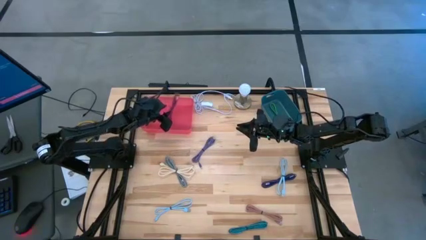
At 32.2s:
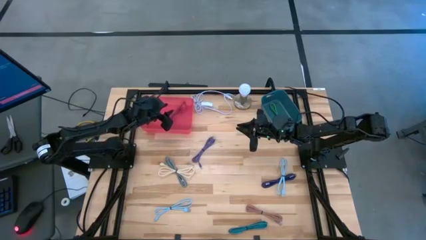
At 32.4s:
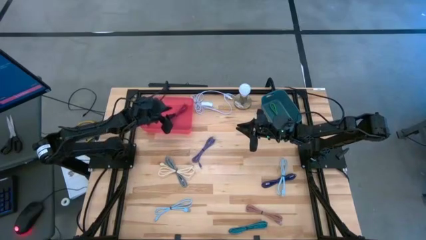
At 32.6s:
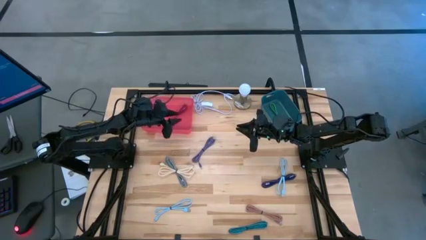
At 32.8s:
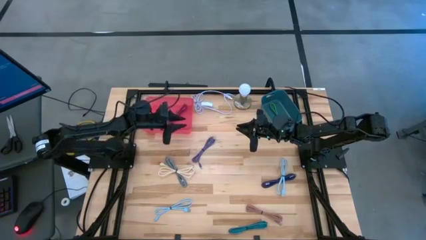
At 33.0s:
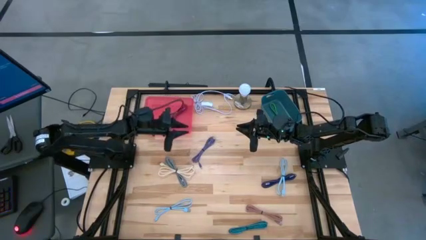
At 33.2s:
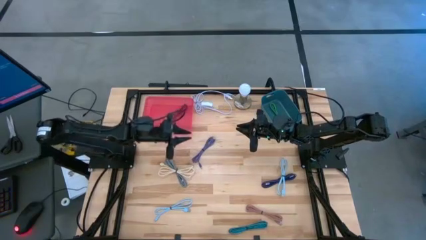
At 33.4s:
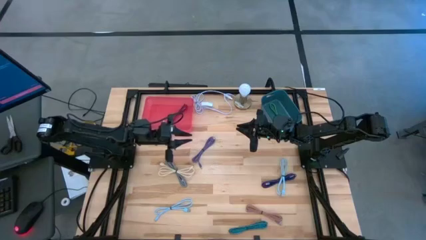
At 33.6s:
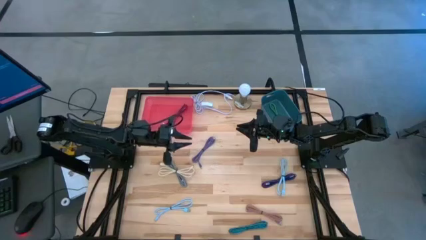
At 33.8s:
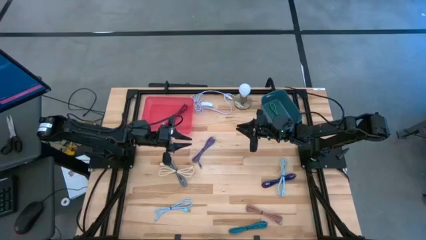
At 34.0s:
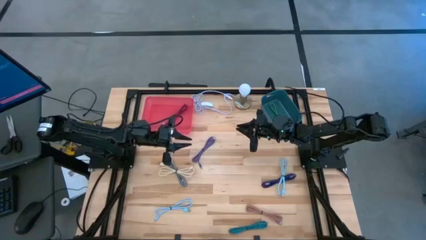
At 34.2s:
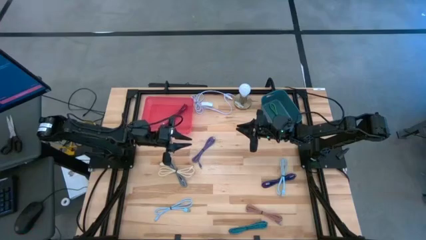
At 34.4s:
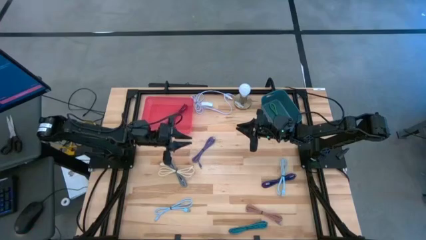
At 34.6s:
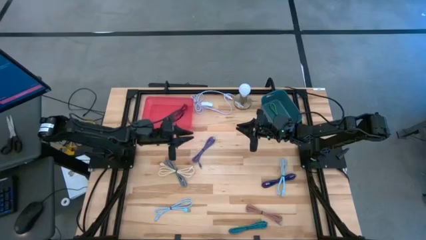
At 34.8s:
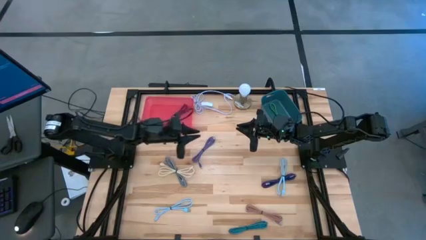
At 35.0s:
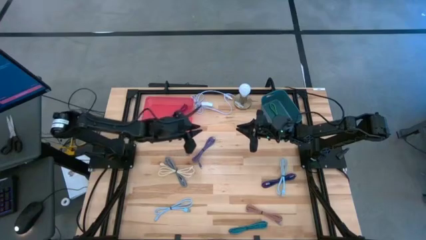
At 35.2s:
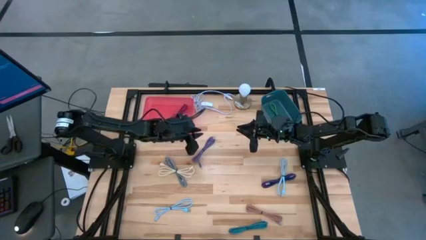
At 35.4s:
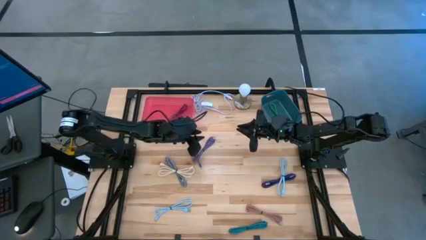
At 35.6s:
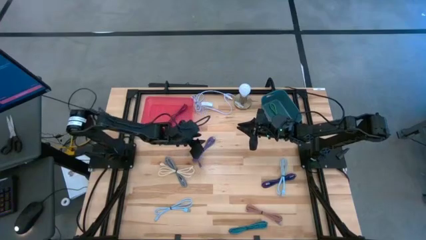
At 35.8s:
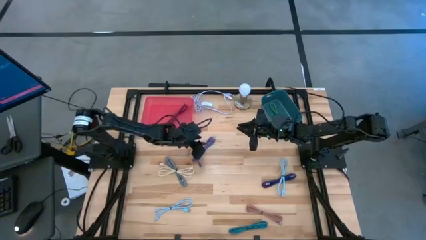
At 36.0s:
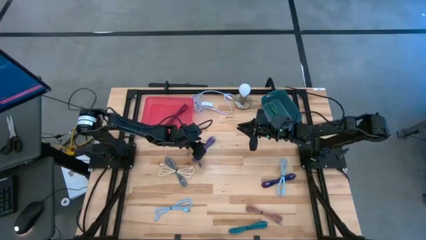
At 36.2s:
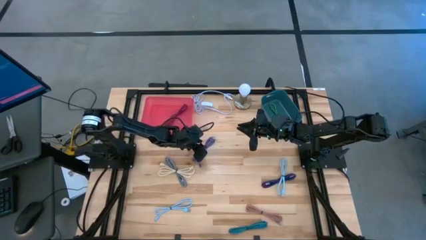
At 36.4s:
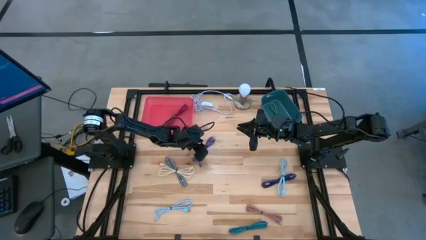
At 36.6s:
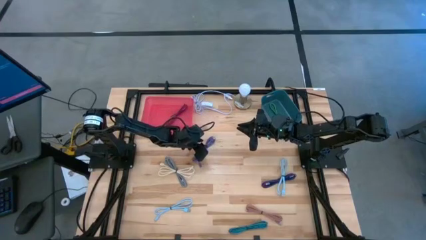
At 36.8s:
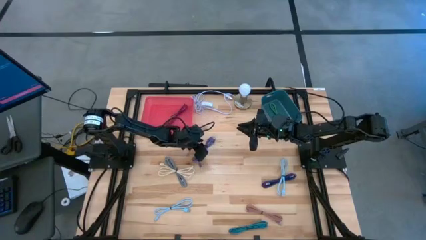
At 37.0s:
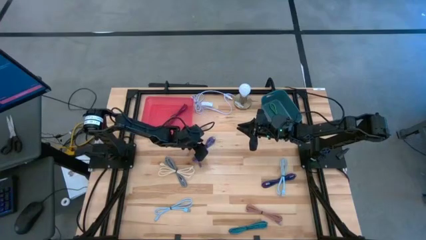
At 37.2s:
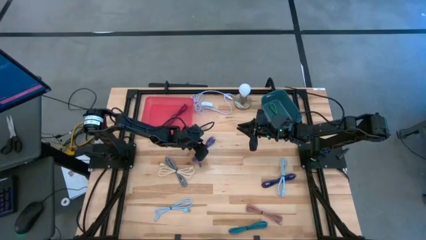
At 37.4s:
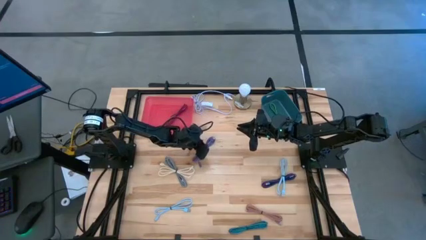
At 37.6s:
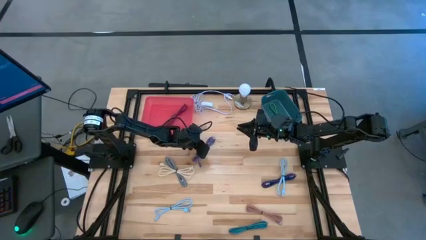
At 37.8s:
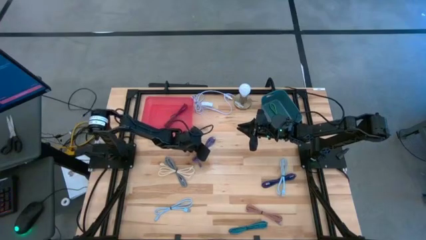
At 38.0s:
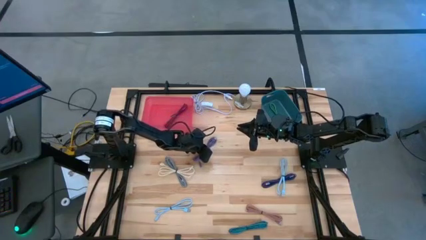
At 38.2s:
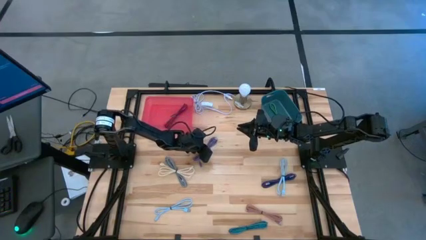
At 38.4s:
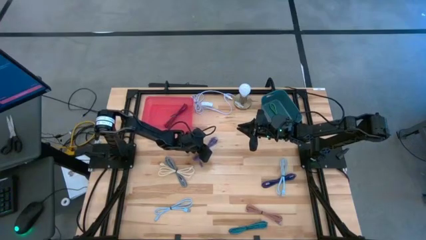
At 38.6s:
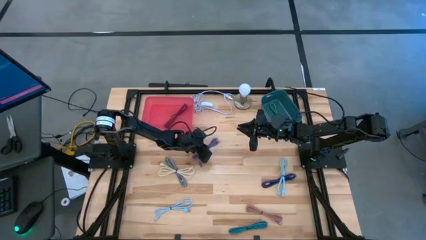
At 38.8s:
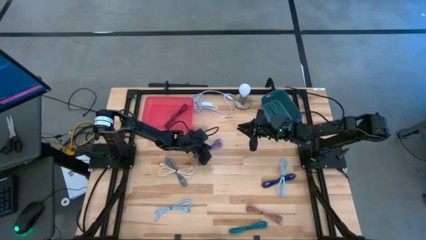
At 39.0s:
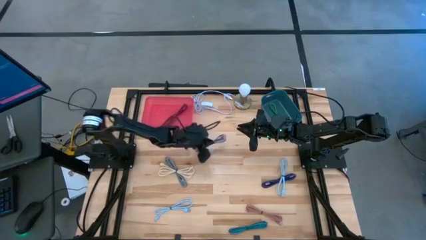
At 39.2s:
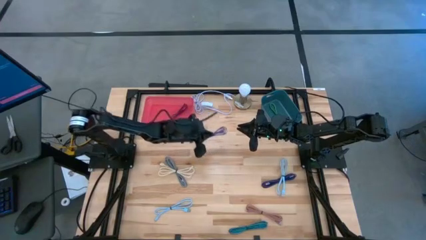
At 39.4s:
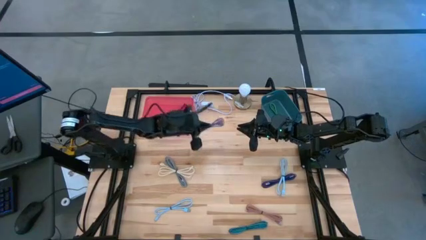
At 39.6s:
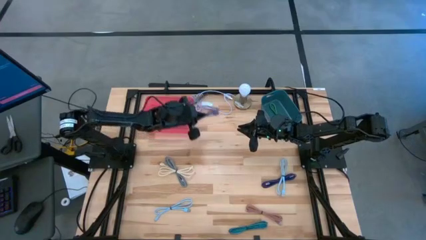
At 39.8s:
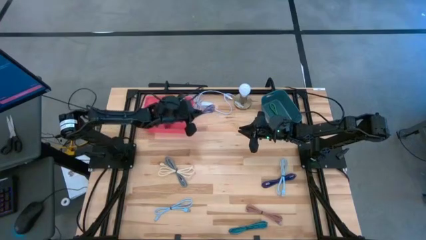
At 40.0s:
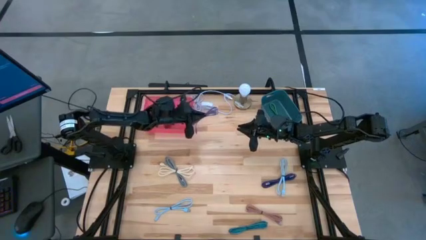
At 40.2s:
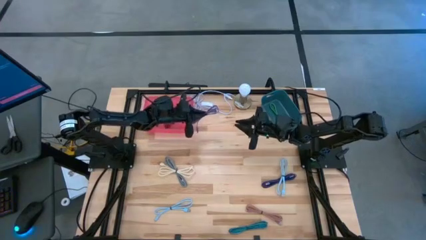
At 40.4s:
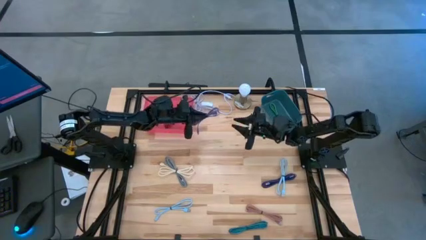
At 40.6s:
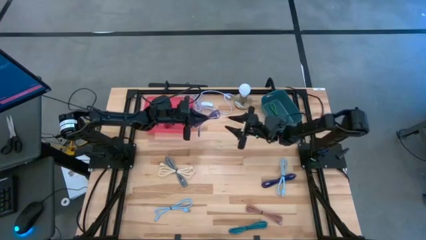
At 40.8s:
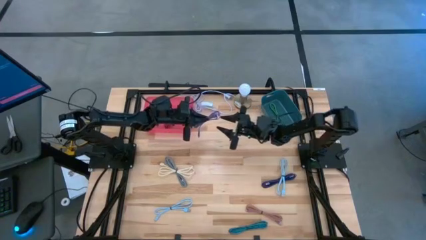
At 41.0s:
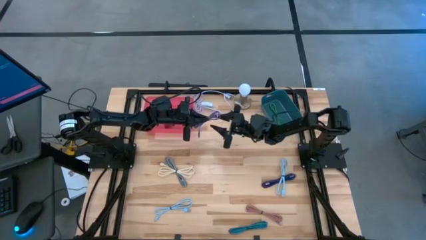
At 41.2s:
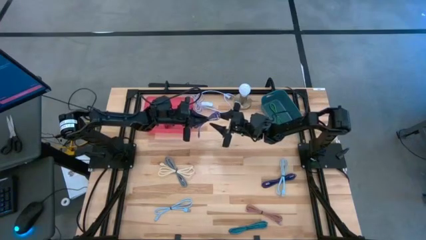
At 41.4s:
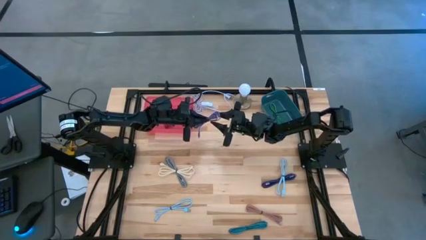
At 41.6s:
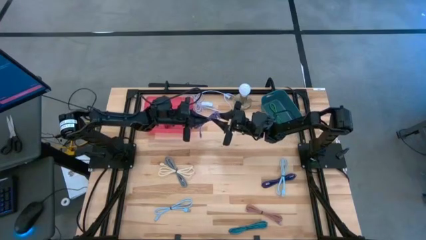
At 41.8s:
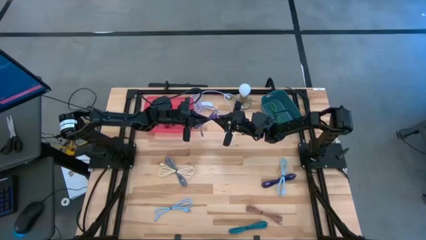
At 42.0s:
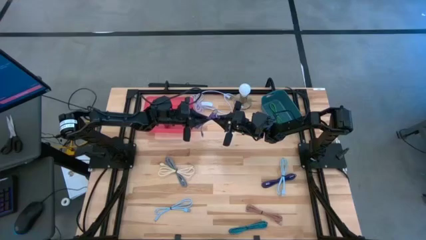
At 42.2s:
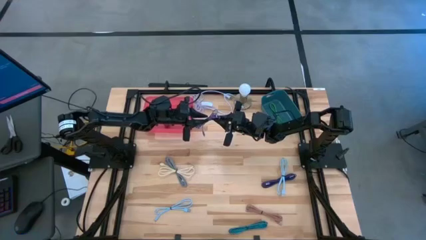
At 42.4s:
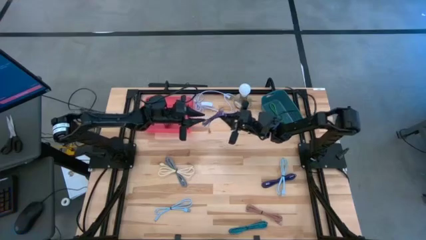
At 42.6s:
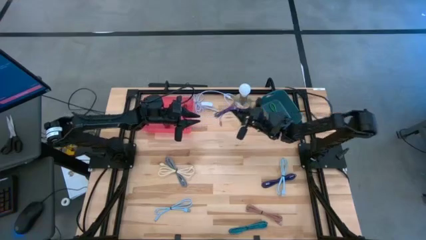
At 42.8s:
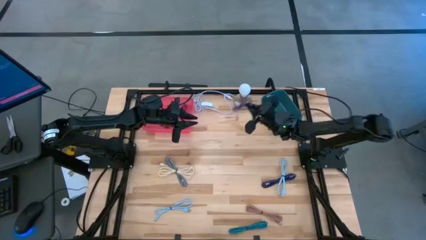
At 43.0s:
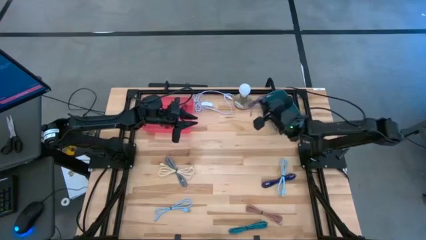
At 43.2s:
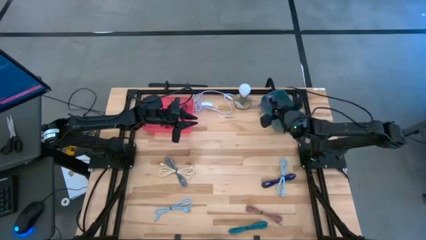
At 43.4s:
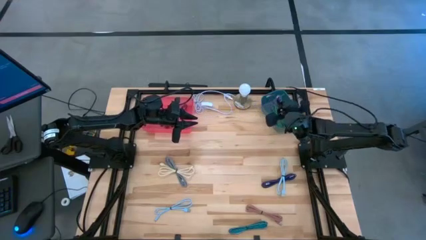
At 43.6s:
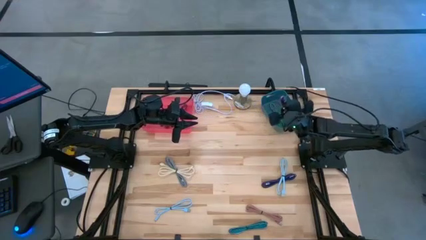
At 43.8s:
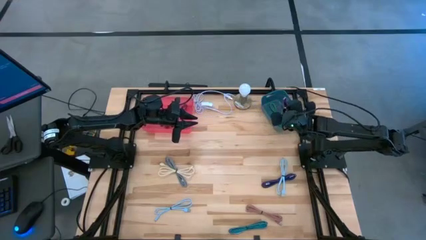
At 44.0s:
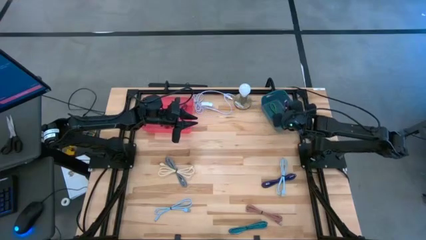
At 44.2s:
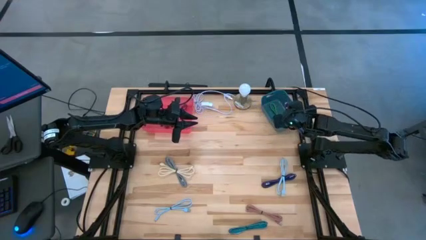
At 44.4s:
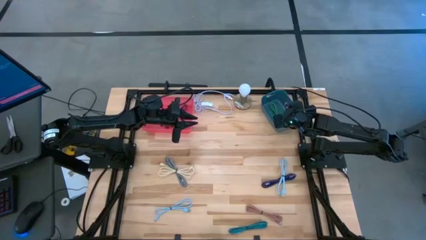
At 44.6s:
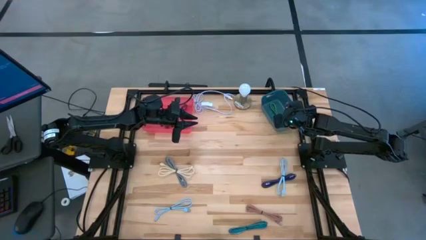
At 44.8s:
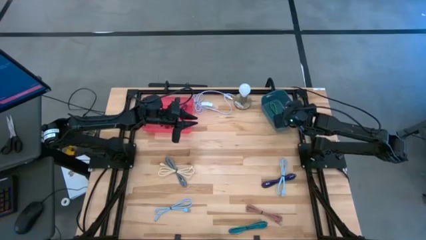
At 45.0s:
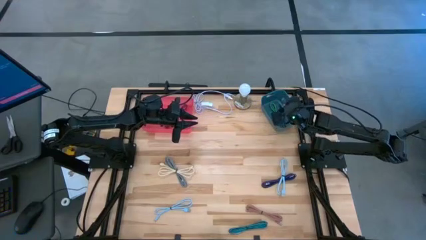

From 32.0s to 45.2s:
Task: Pick & Place USB Port
Put the violet charger cable into the blue bin

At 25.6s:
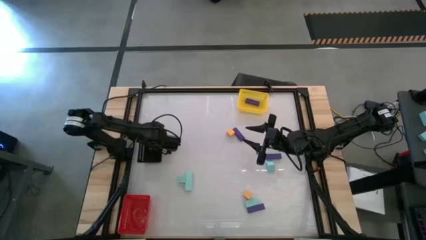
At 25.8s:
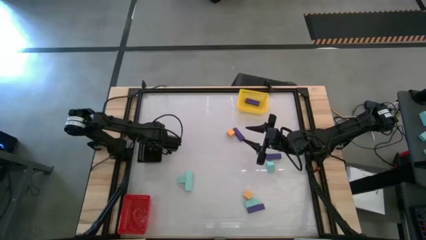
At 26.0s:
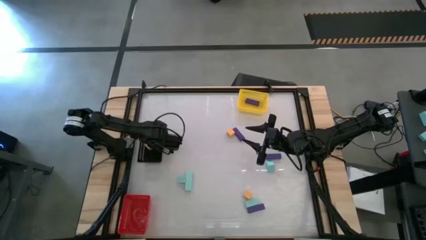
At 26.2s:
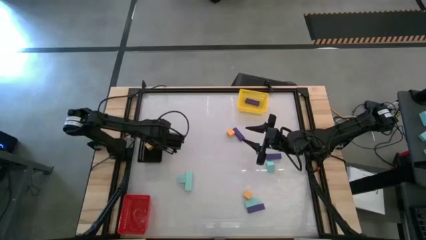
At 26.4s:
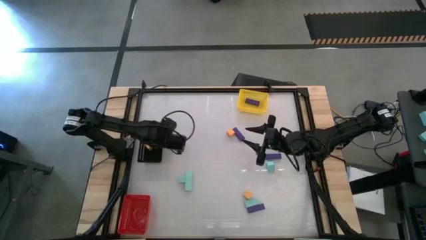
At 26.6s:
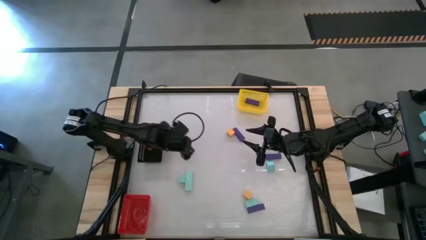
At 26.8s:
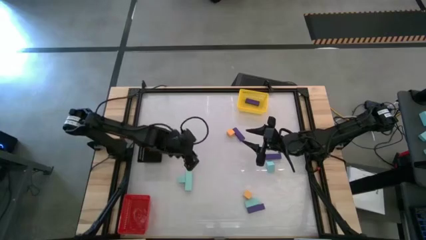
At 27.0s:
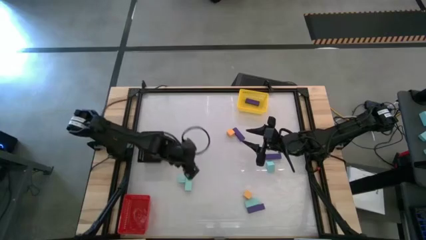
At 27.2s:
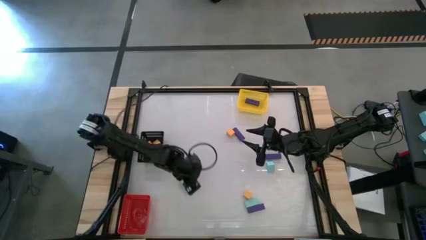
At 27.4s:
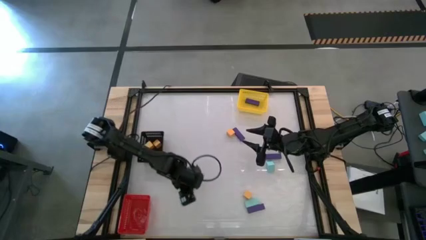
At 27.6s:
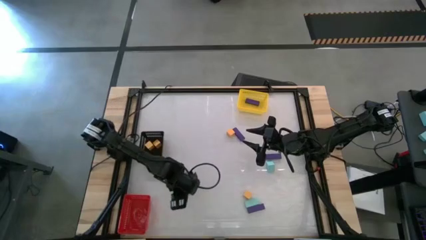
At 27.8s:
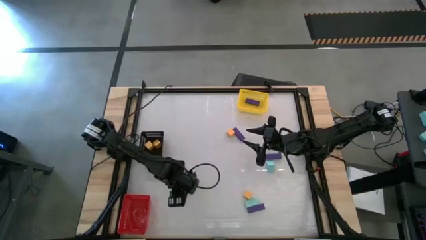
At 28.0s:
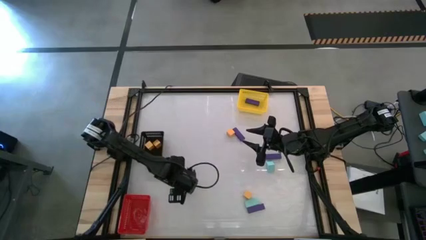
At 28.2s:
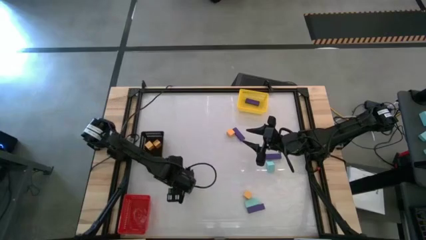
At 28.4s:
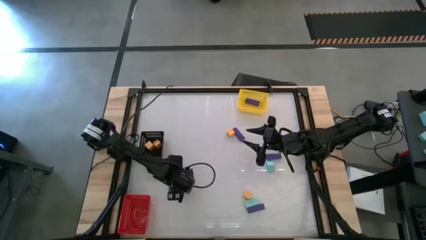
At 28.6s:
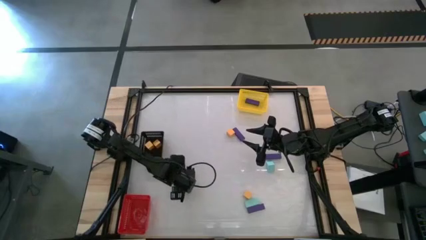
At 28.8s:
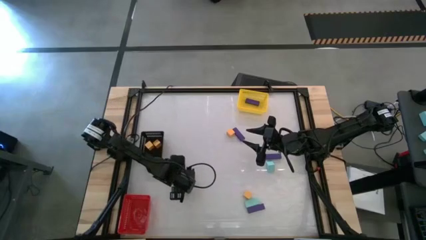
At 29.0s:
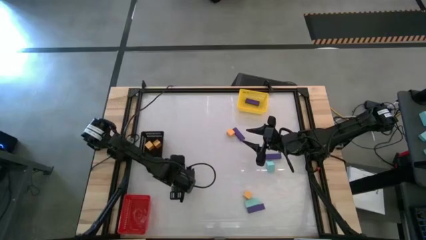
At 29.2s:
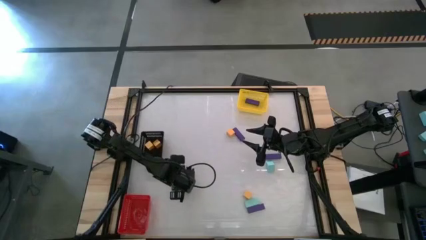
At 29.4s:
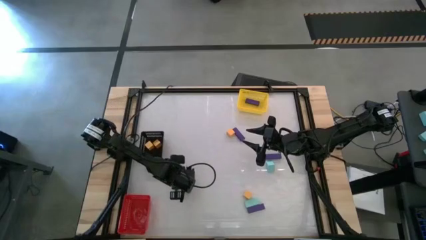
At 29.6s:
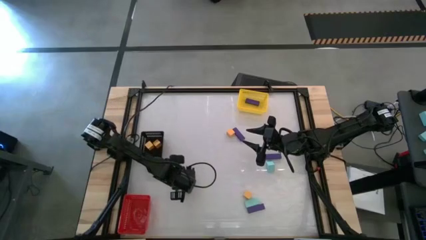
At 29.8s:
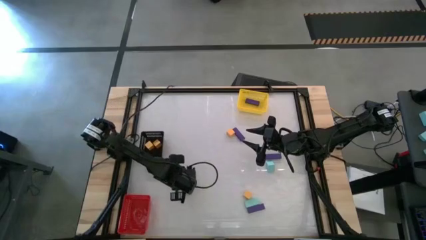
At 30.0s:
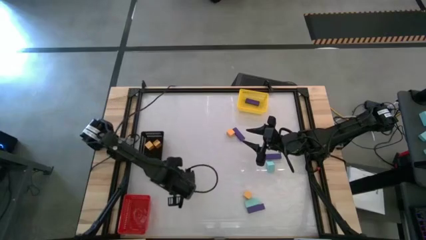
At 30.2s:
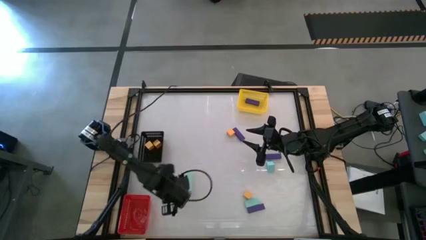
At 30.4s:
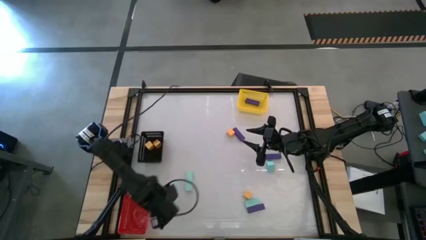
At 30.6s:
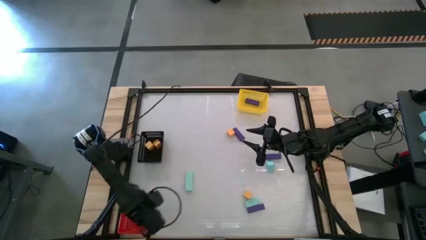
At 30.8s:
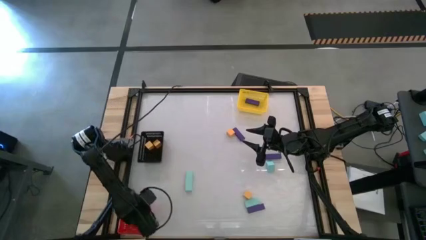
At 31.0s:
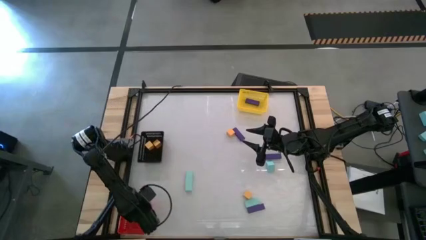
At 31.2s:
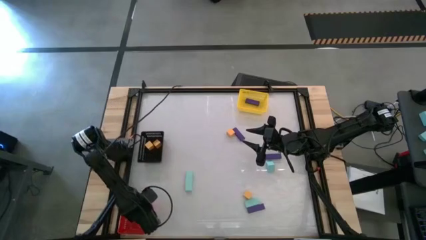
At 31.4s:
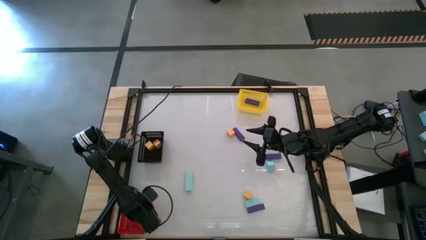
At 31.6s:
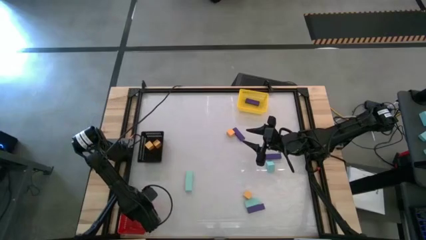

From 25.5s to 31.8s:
Task: Sort & place blocks by color
Put the light blue block into the red bin
